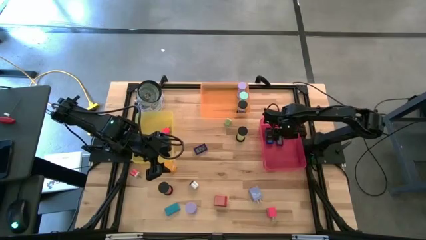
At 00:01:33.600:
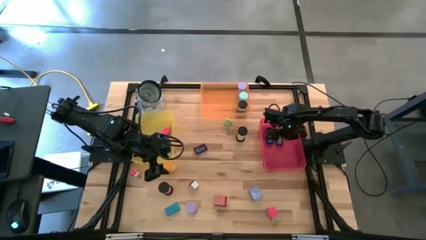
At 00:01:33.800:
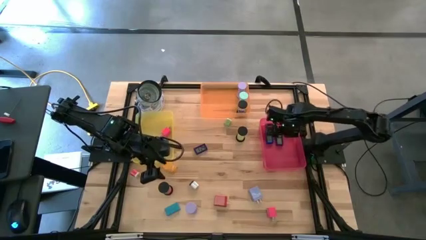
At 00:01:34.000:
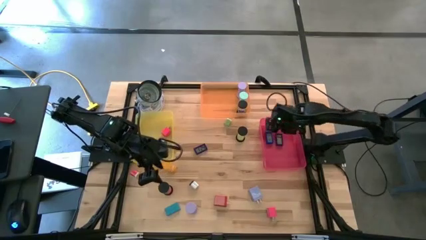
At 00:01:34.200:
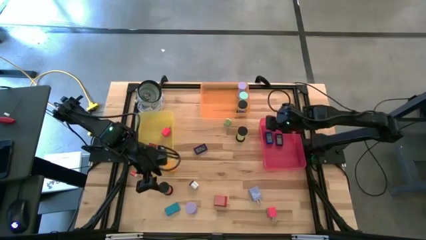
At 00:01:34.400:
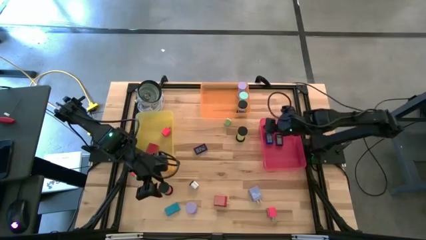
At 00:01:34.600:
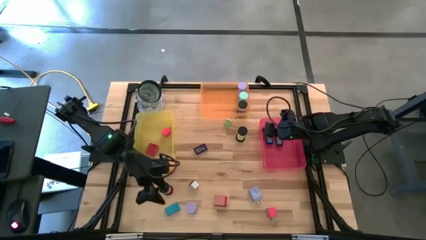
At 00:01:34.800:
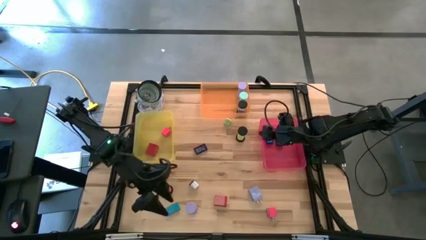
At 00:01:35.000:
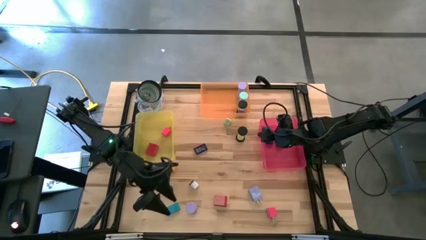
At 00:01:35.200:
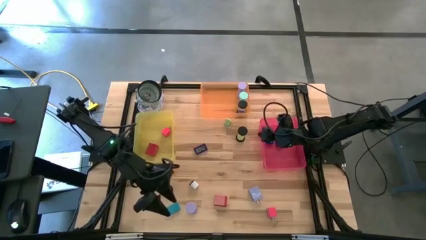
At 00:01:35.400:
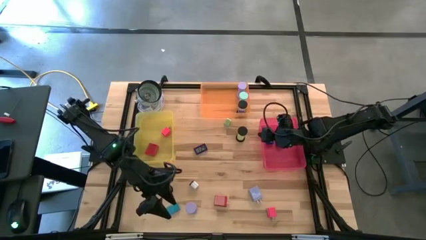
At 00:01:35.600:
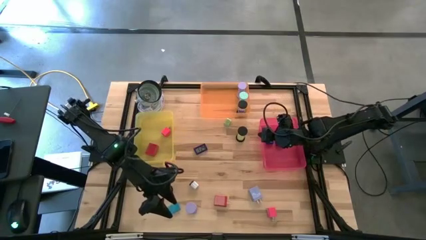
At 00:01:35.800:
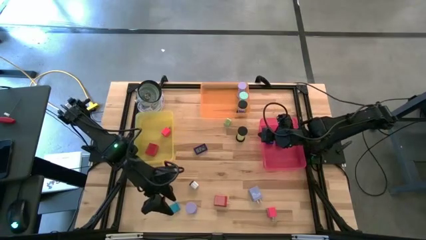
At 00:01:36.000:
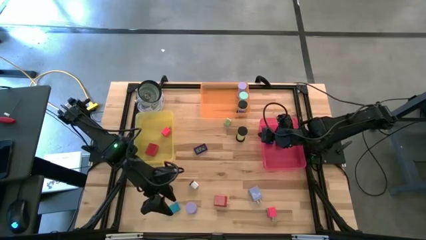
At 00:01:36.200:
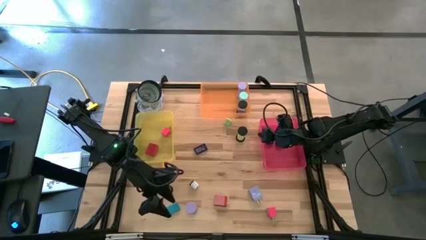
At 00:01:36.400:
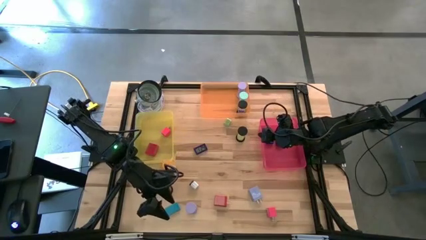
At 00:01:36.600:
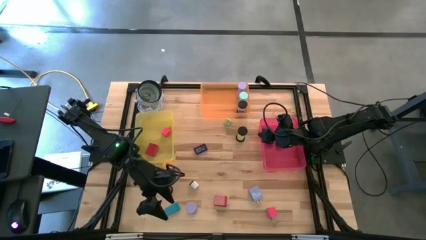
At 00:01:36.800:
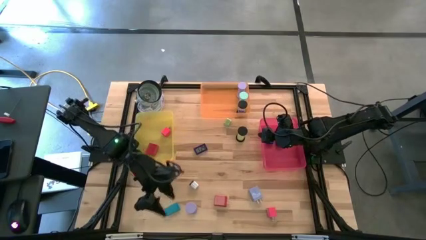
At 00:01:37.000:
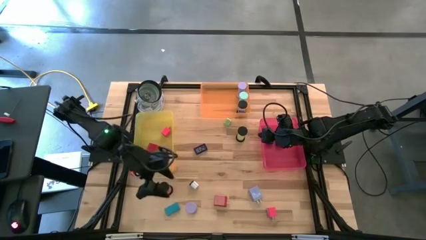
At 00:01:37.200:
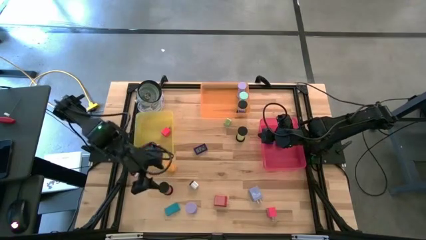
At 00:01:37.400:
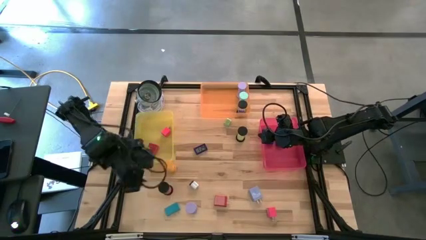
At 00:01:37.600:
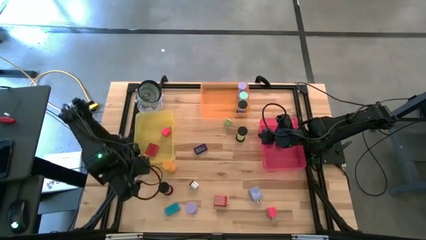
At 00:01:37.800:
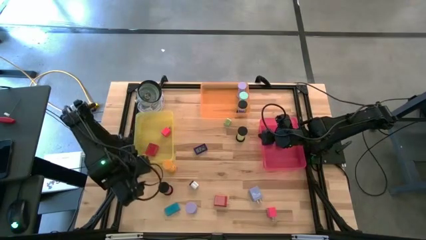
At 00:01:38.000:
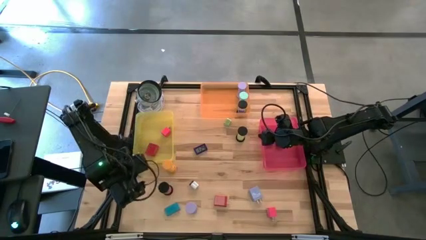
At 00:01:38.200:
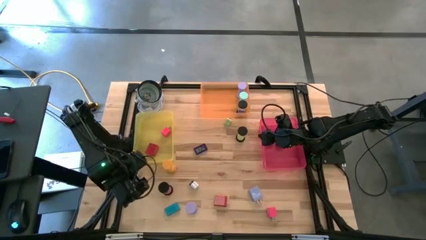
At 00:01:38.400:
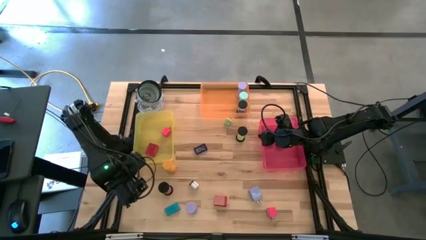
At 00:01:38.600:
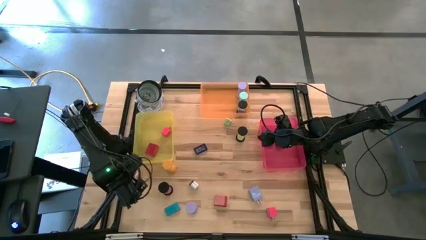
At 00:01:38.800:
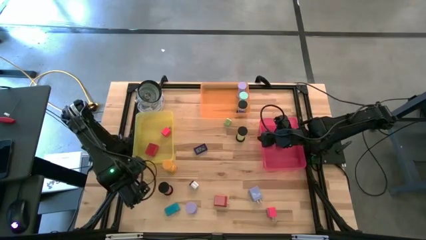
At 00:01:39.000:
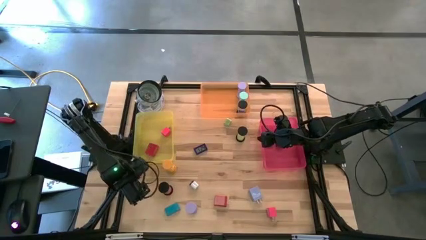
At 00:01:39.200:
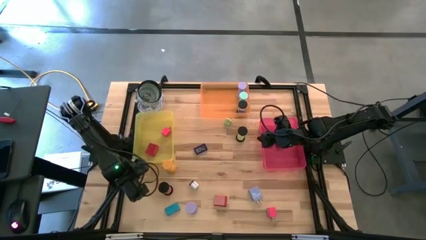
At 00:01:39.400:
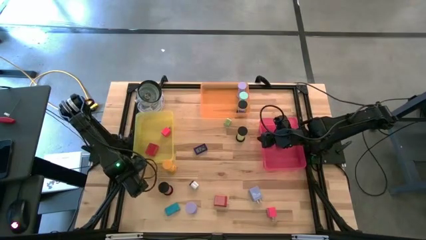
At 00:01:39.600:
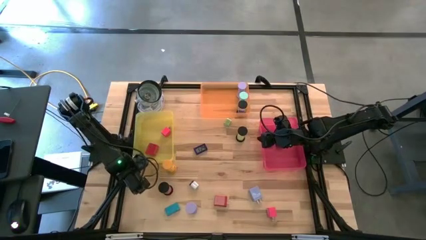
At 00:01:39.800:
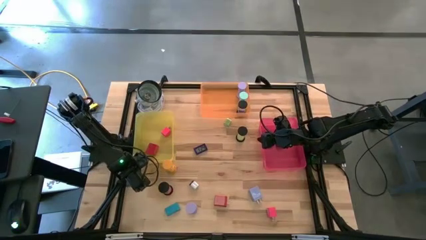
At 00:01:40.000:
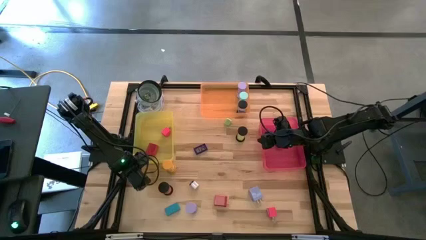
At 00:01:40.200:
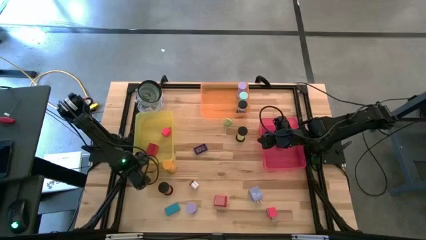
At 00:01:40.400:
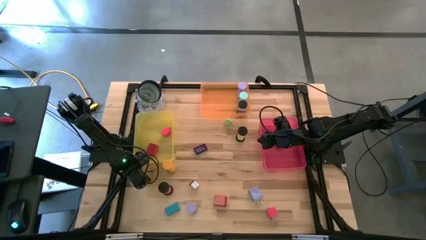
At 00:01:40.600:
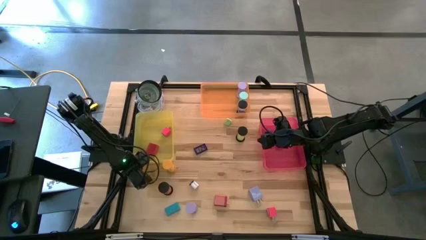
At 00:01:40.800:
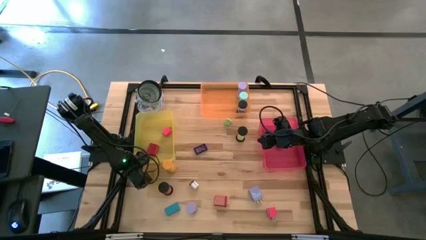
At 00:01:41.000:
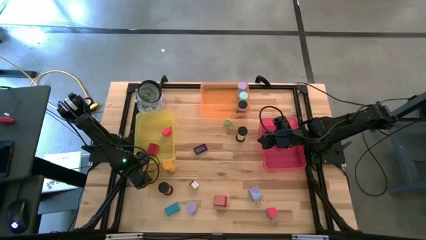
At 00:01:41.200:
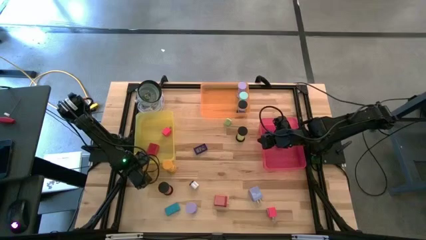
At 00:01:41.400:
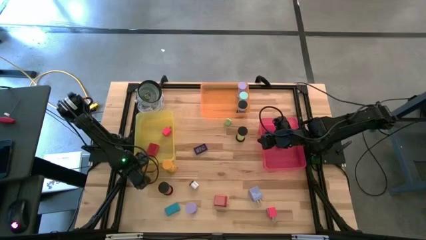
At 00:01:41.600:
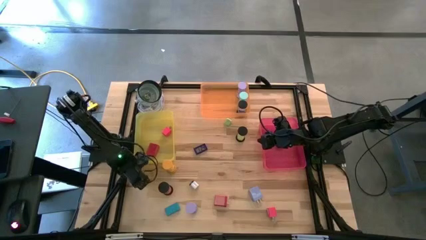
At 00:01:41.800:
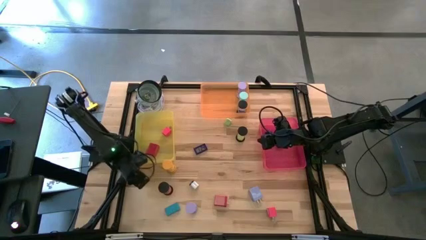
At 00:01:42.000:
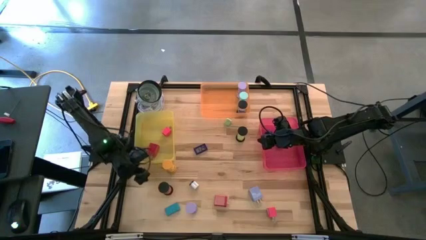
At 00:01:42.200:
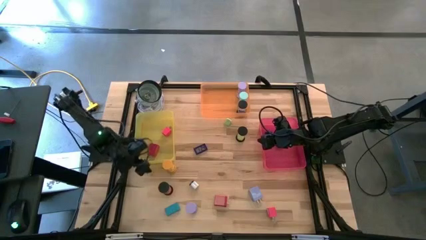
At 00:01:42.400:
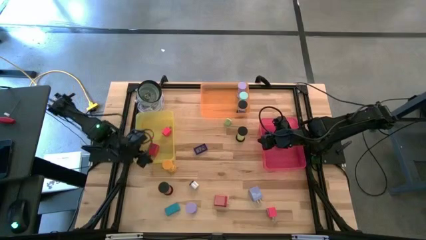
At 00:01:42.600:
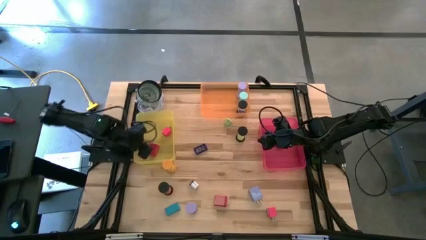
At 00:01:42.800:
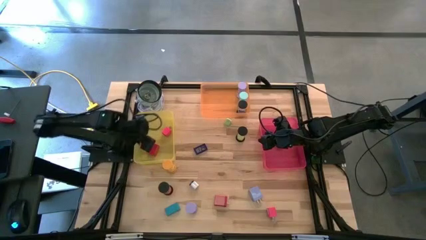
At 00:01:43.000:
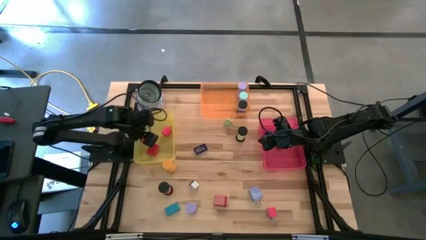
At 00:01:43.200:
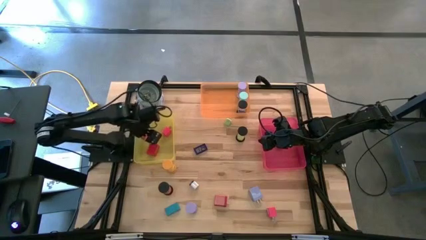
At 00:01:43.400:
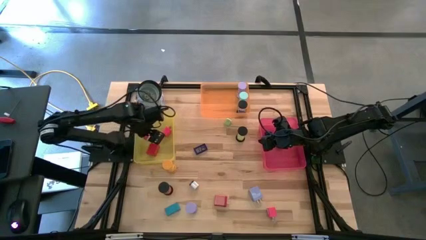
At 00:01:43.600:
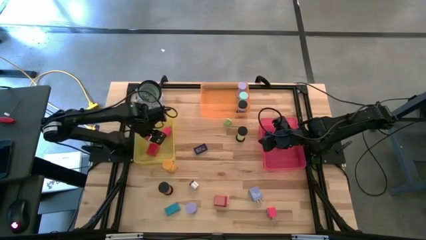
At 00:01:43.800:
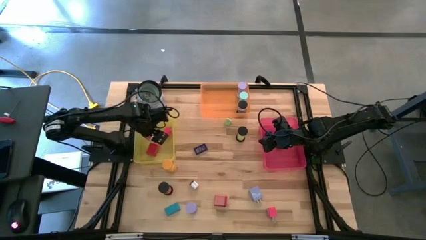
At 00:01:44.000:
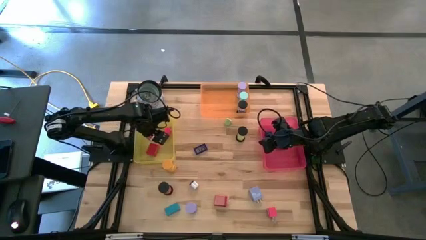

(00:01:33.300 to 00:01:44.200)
Task: Pick & Place Office items
Put the red charger in the yellow bin

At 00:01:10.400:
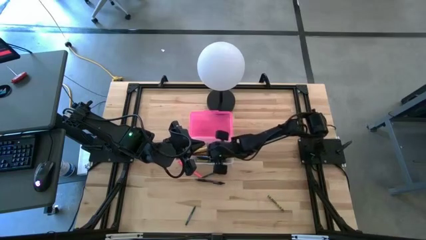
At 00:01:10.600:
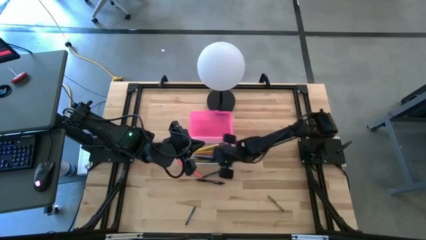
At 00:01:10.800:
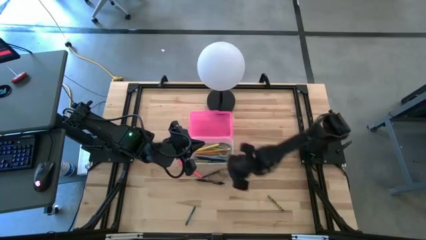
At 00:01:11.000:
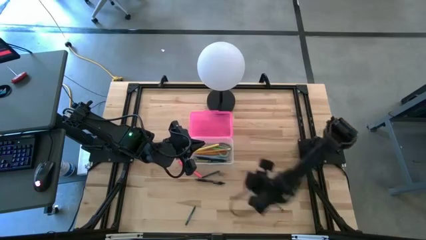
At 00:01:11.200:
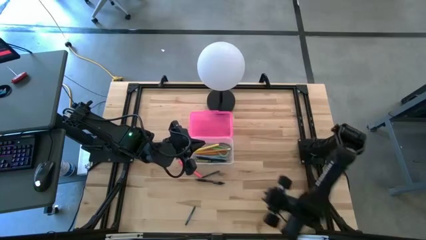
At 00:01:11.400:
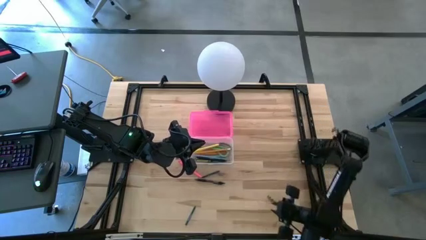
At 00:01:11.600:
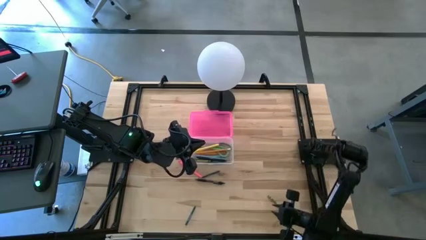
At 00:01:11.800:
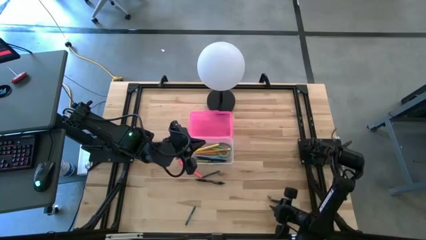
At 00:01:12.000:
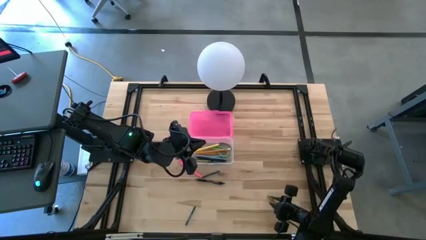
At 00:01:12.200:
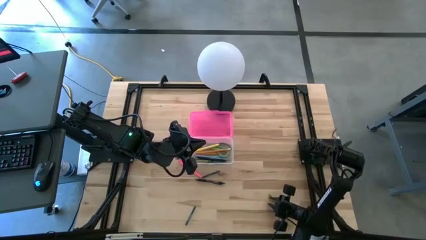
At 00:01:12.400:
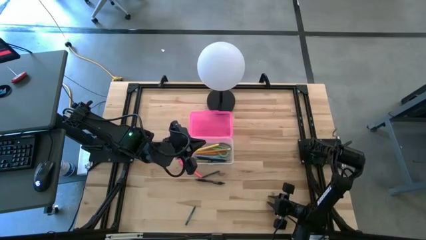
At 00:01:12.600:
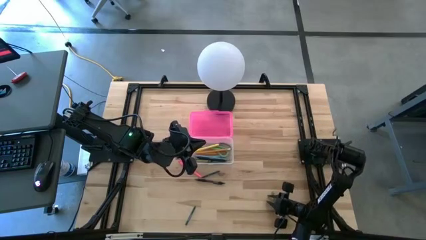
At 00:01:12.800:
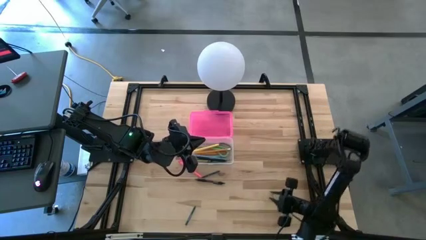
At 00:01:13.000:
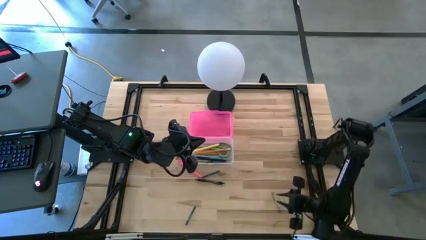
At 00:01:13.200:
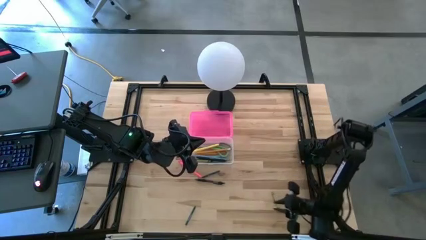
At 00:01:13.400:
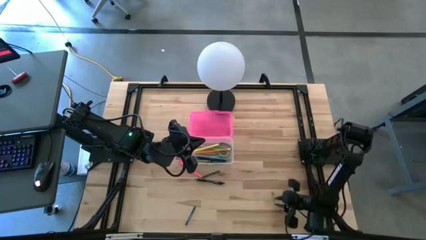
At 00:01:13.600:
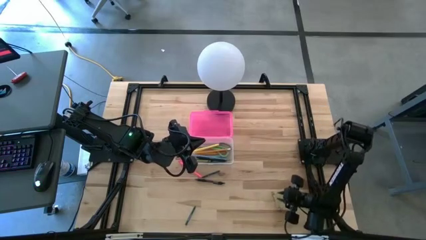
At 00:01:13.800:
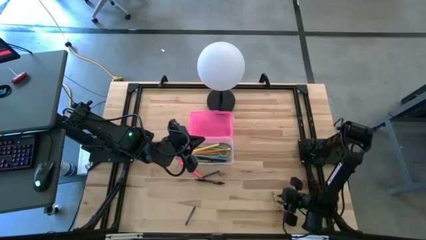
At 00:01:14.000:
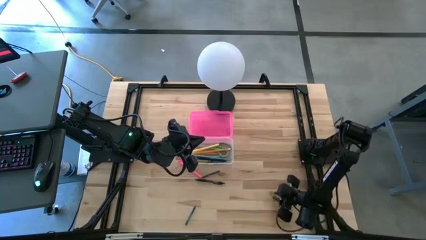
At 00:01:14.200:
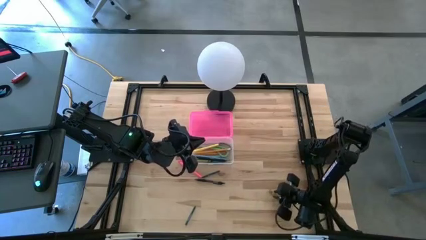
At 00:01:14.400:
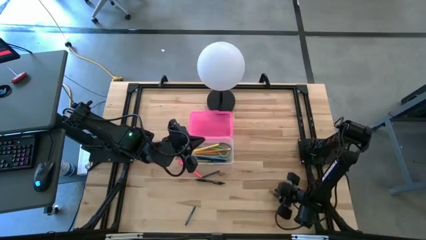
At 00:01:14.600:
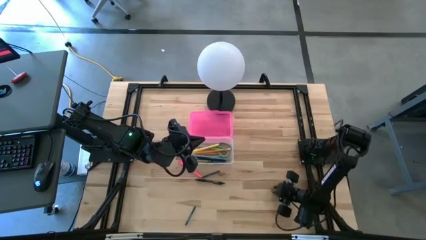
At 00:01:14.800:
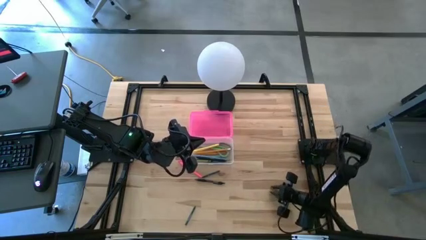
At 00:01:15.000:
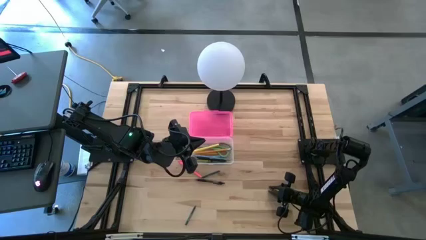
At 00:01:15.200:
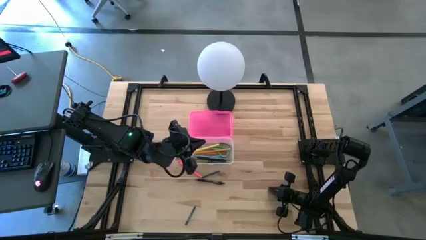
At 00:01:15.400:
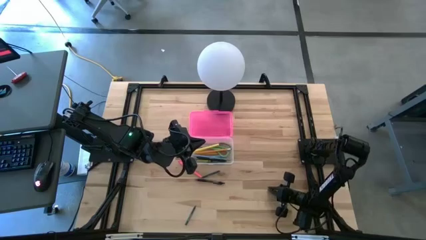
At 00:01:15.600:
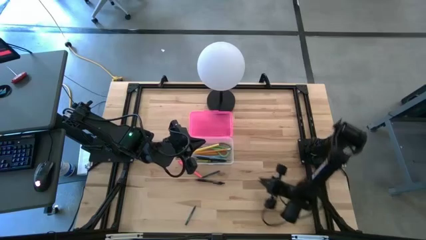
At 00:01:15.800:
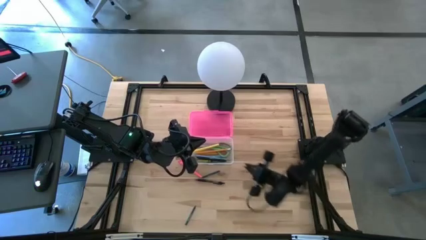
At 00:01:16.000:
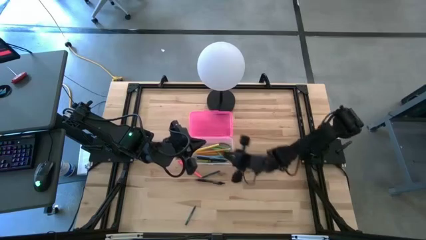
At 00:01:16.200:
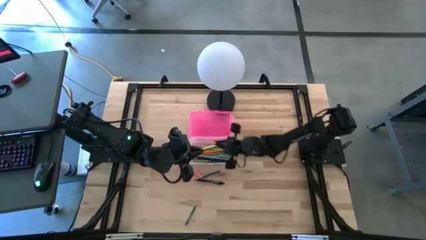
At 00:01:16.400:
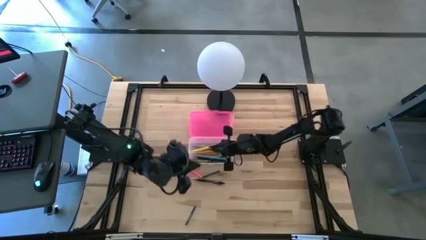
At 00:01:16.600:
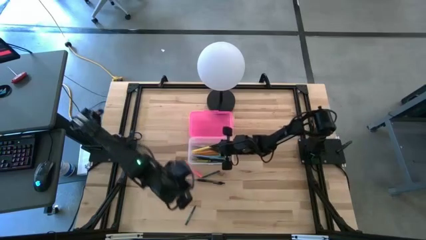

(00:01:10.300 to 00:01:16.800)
Task: Pick & place school supplies into a supply box
Put the light green crayon into the pink supply box
